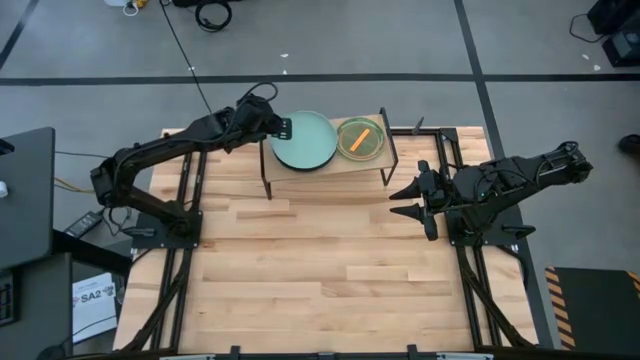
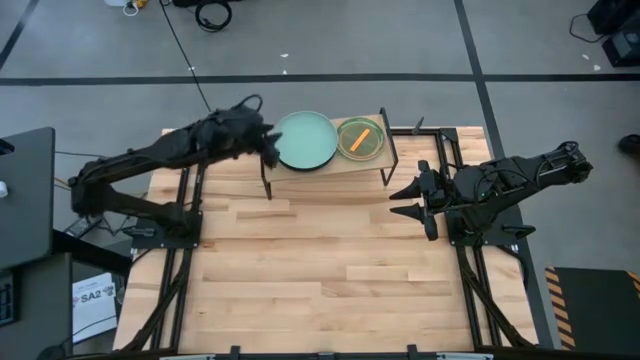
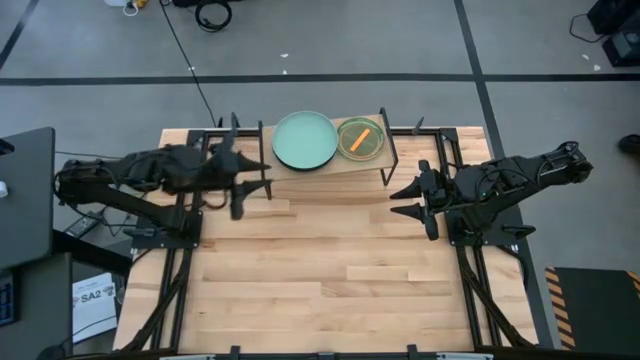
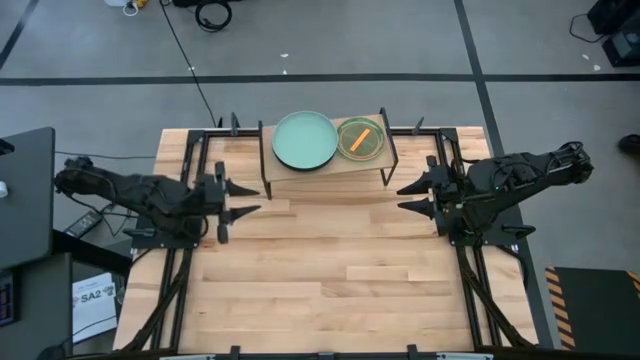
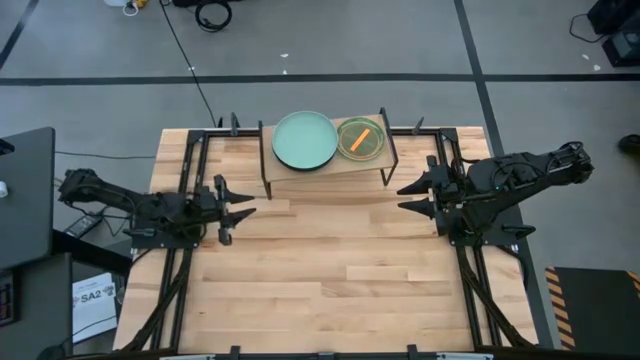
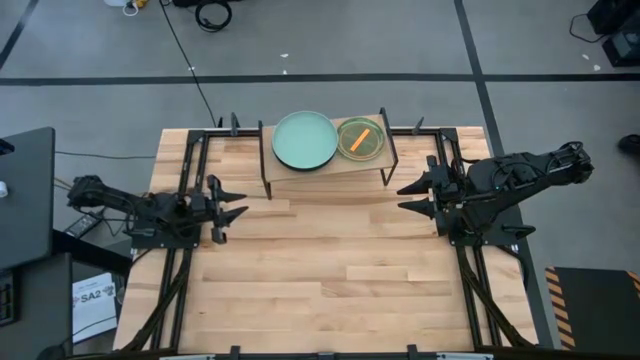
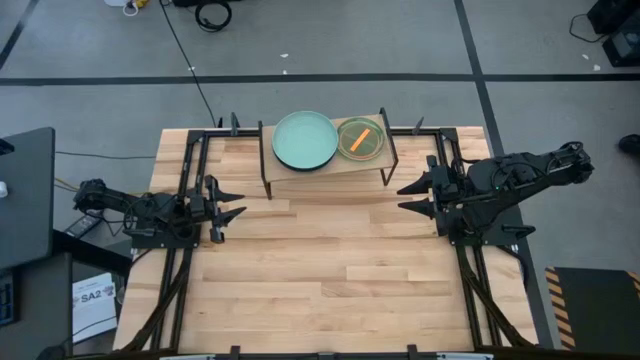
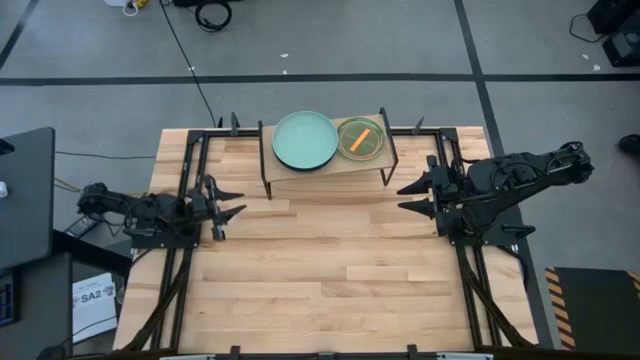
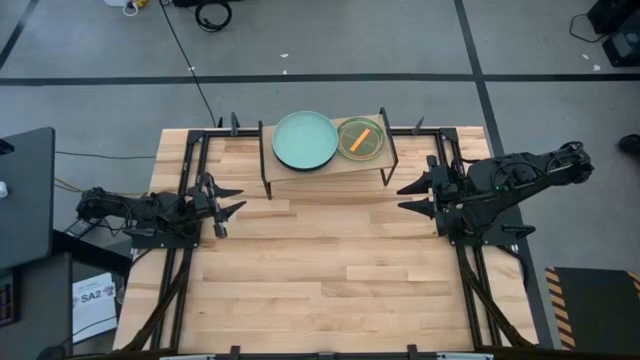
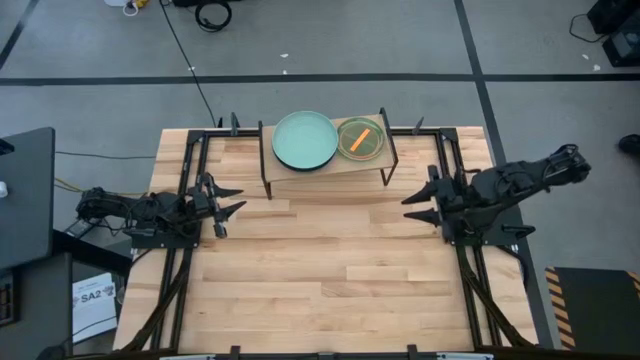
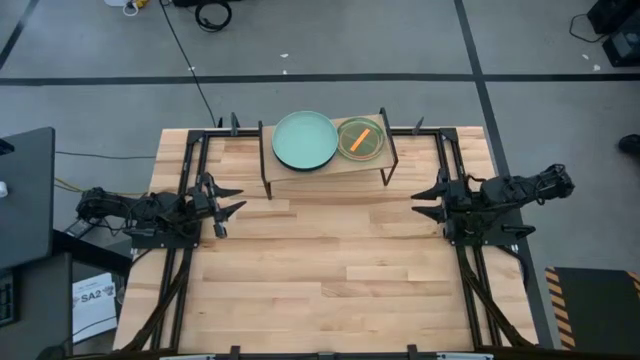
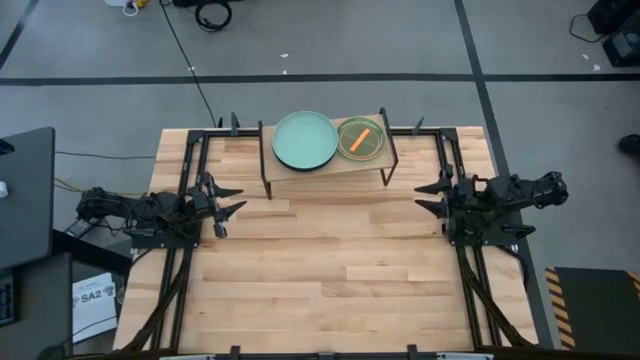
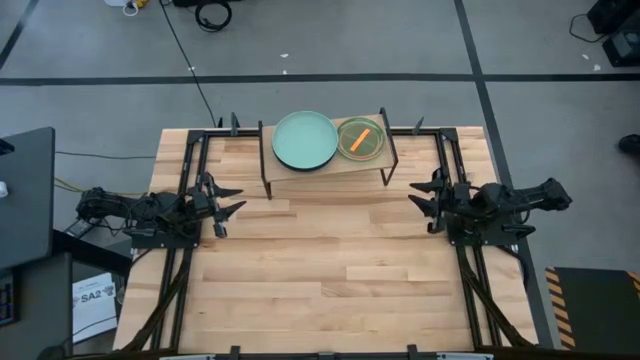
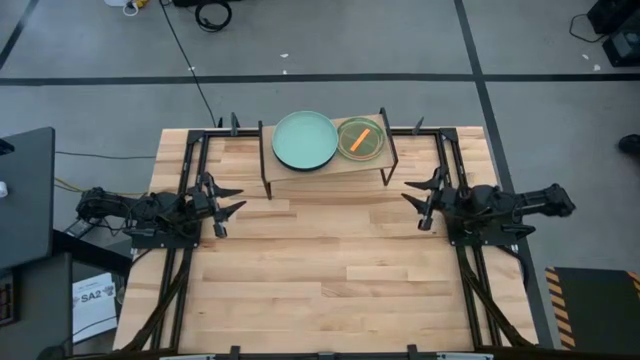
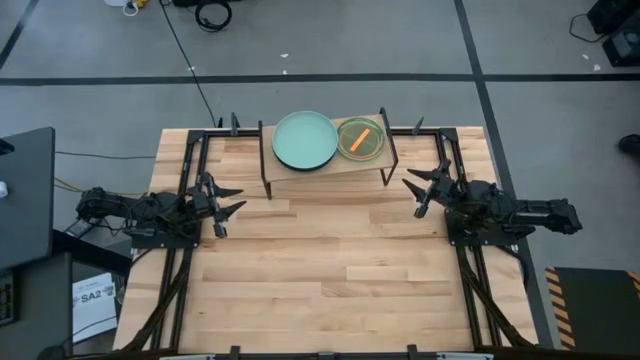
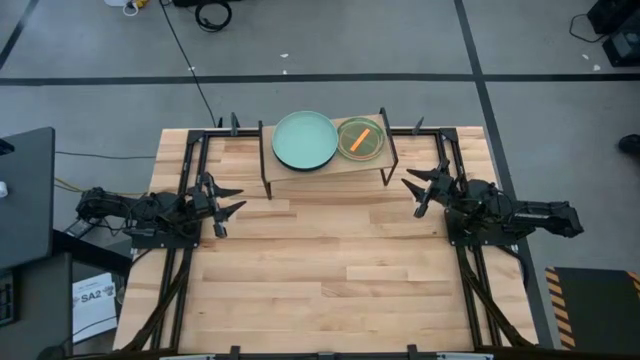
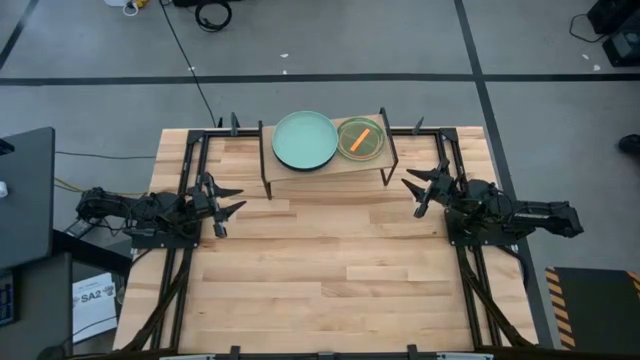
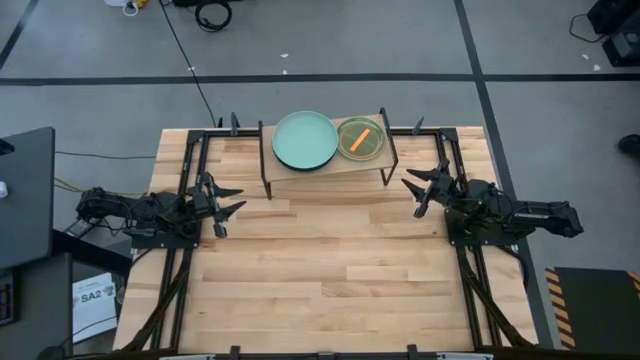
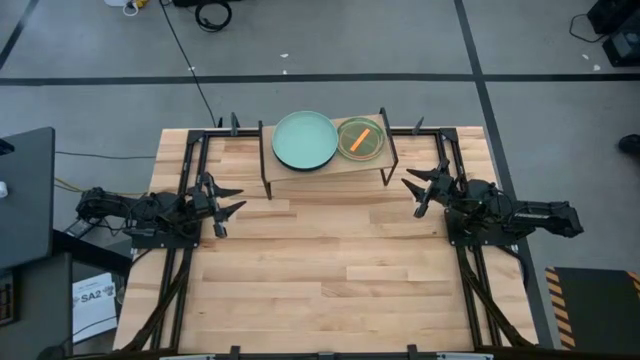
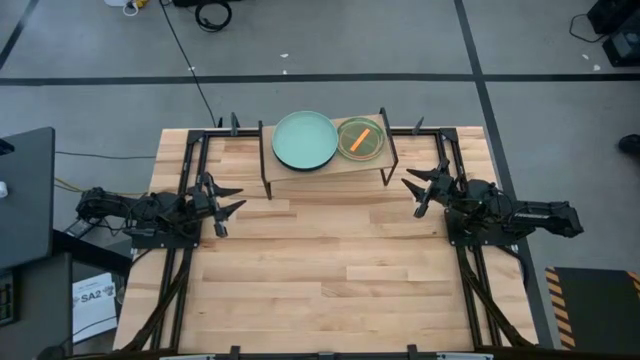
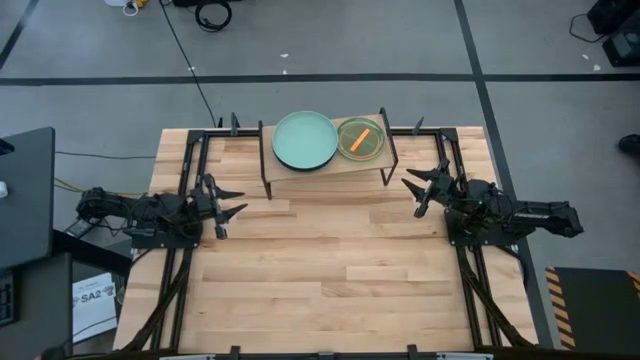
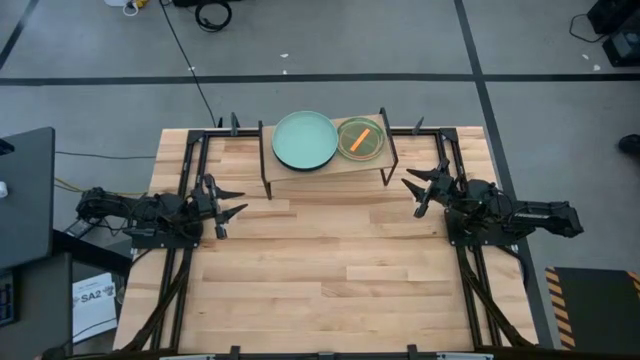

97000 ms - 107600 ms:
Task: Place and stack plates onto a shelf
Return to Home Position

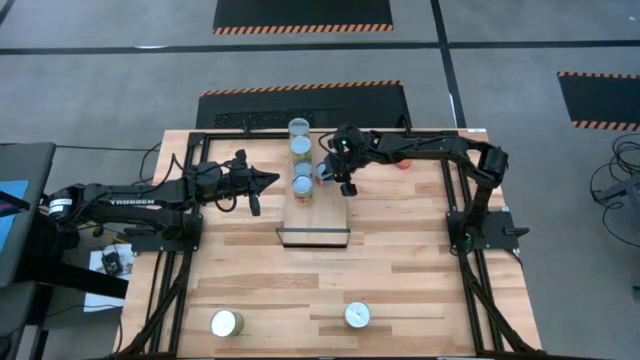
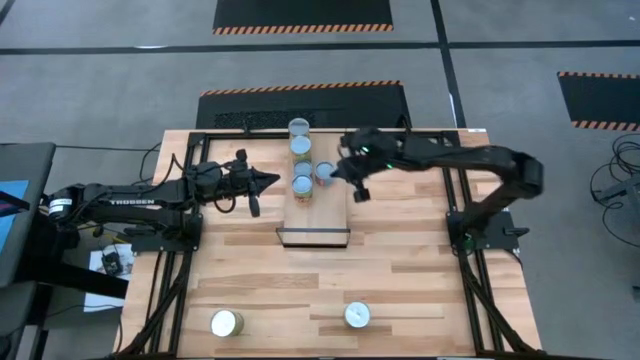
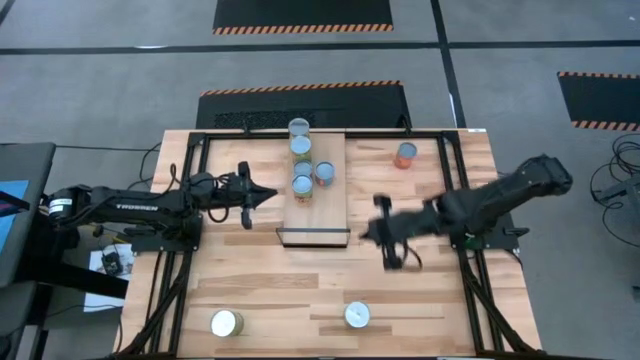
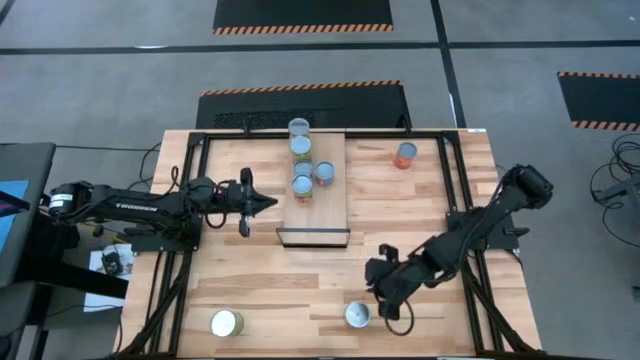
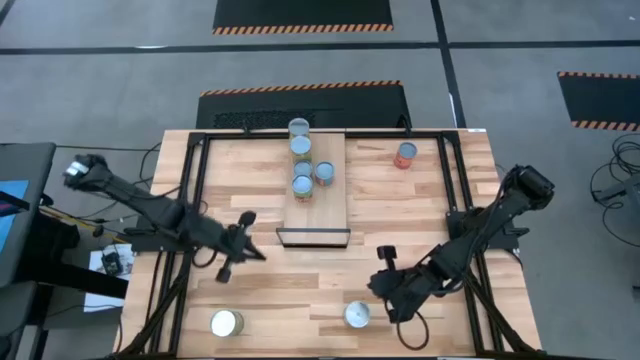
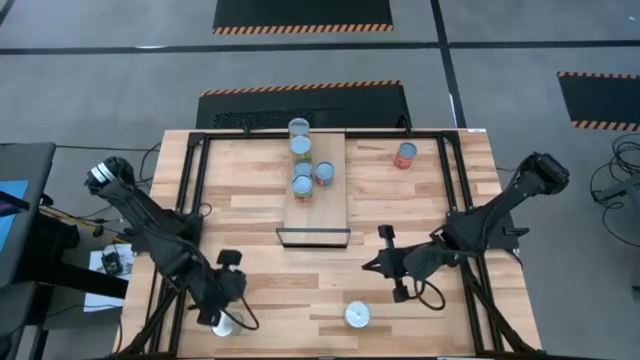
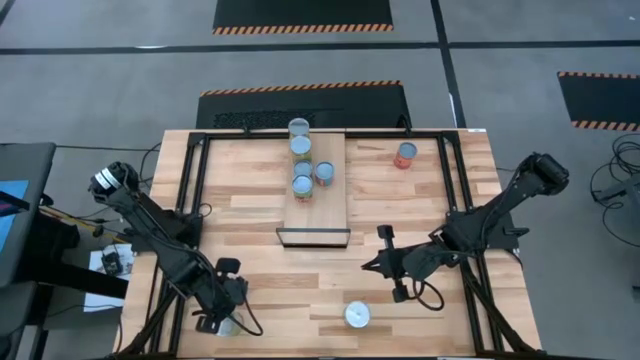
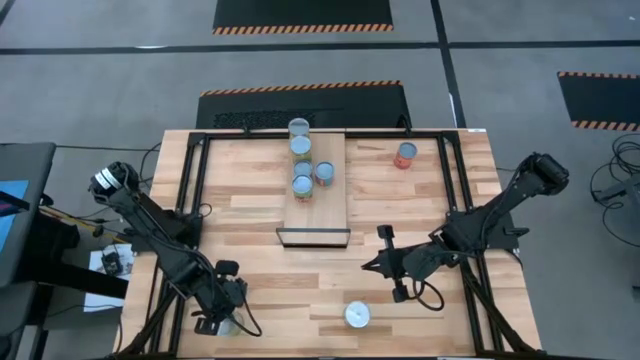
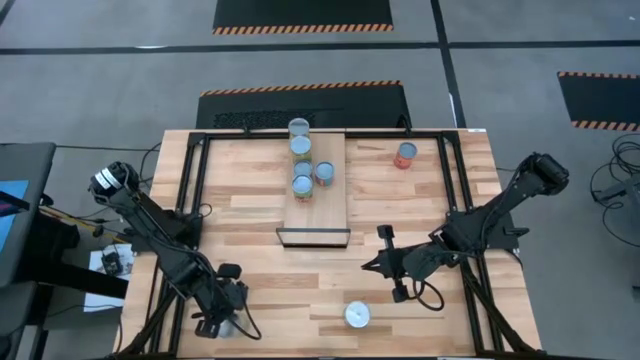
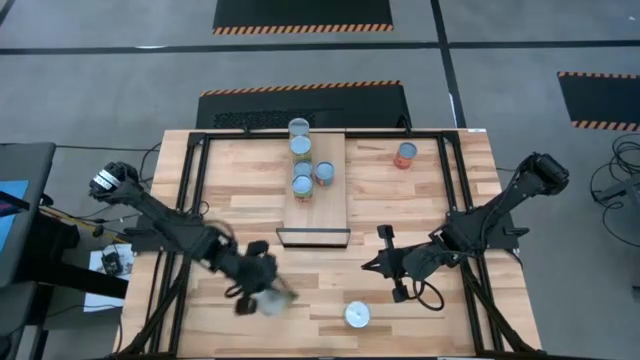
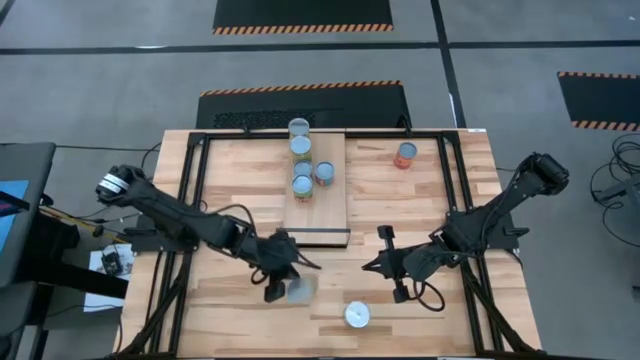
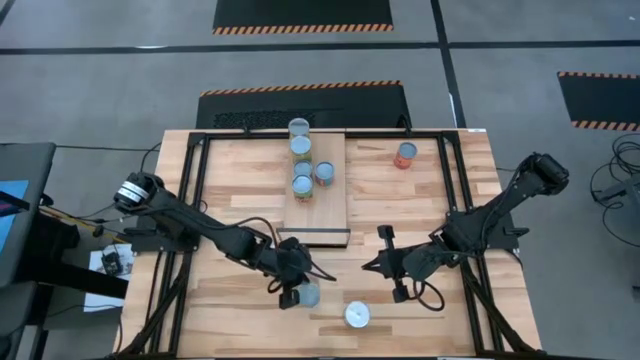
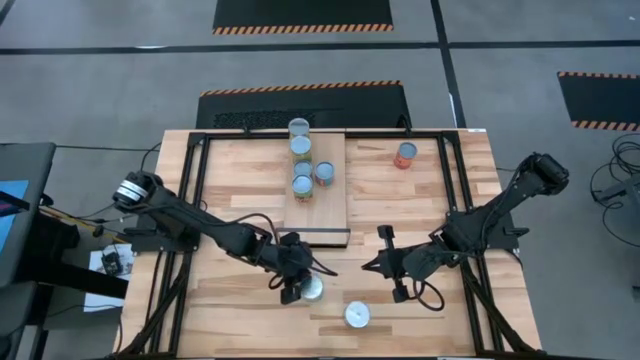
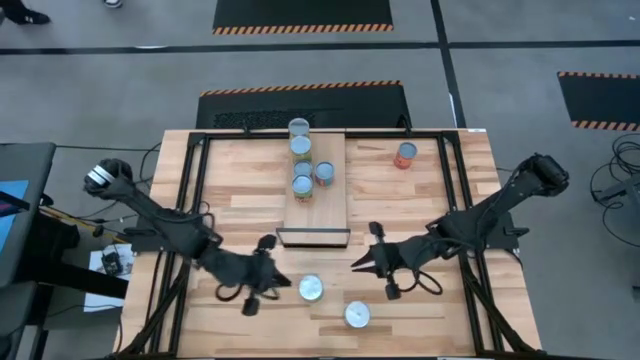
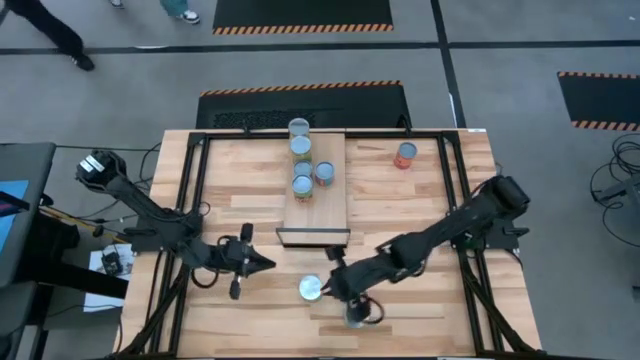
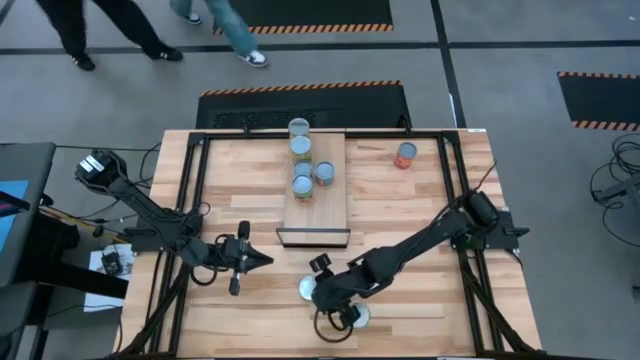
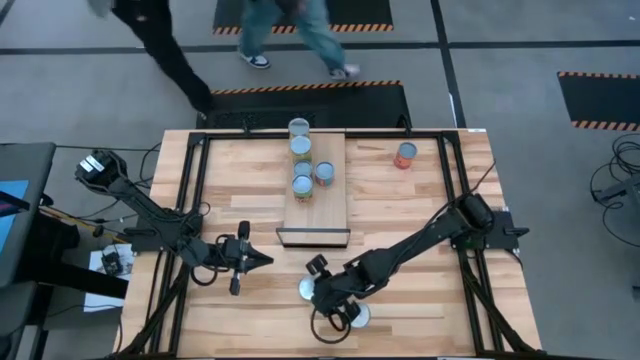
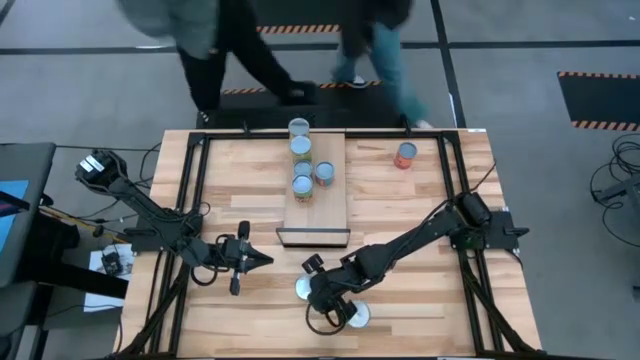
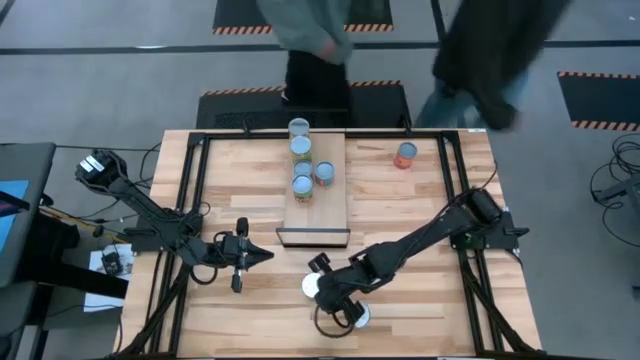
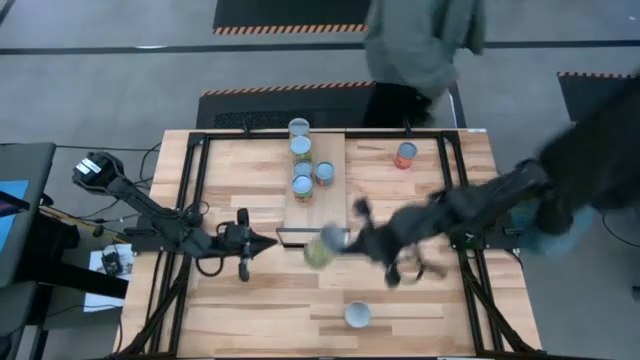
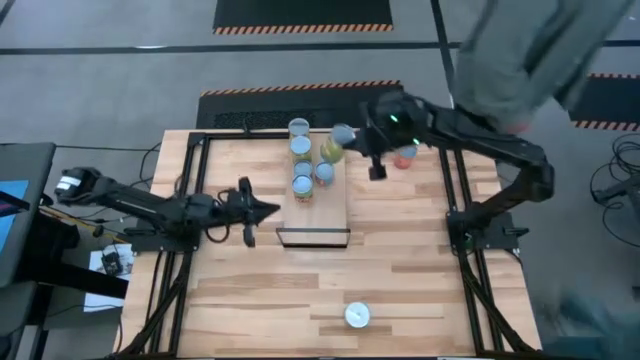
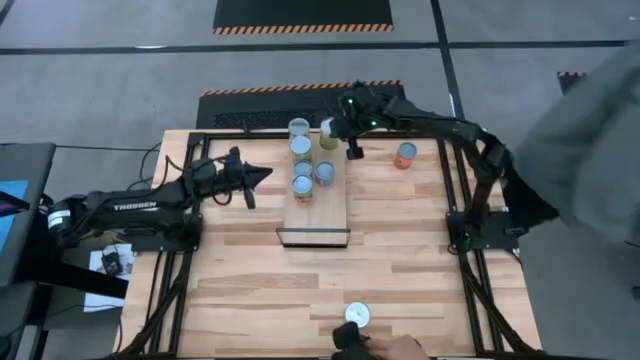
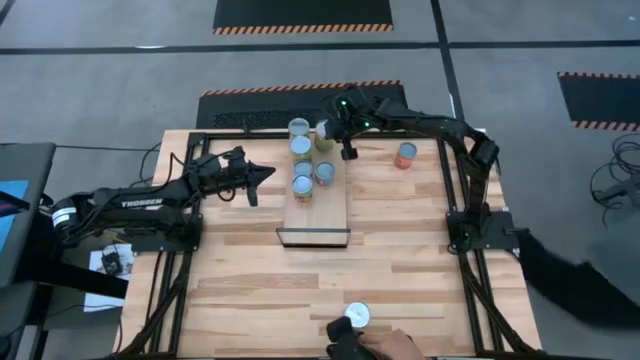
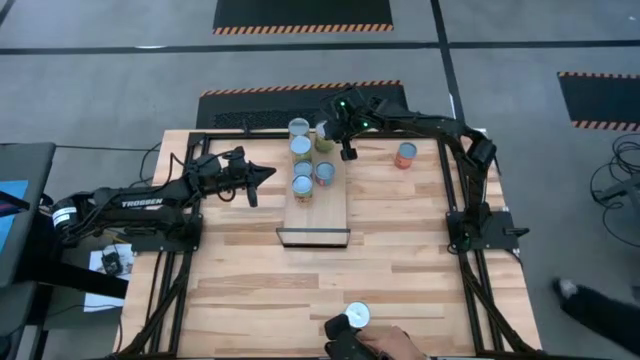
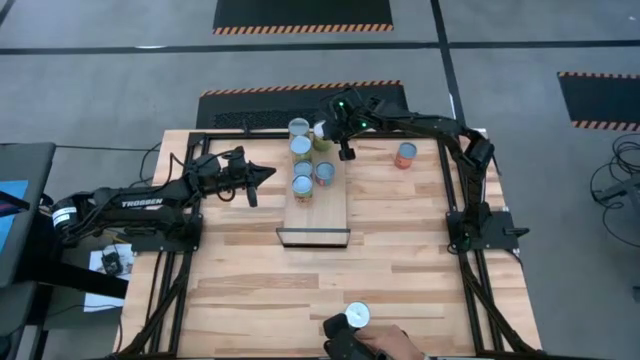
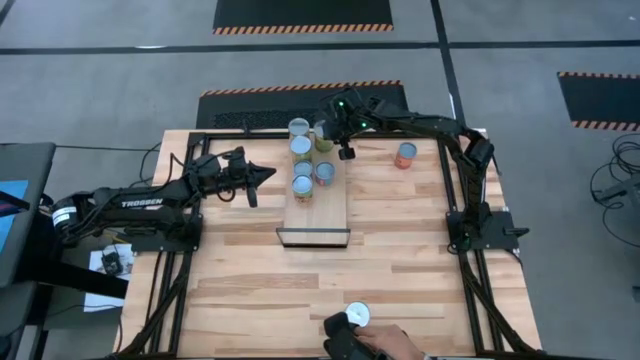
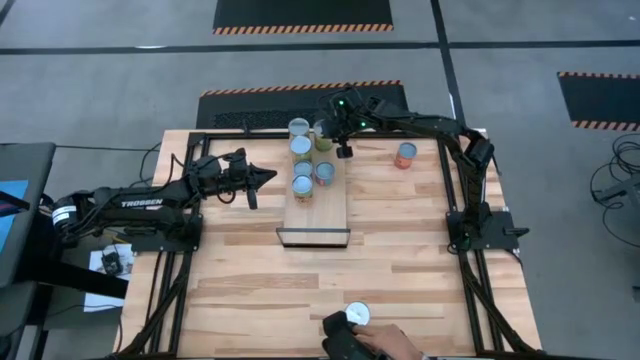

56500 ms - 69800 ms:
Task: Pick and place cans onto a shelf
Put the canned pears on the shelf aligned with the other canned pears
